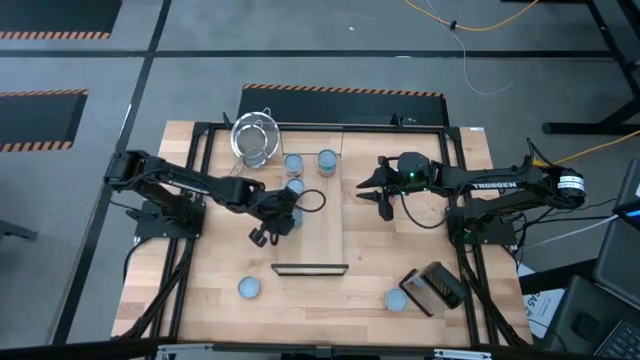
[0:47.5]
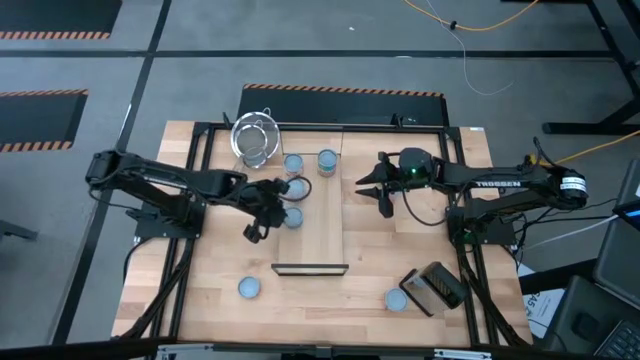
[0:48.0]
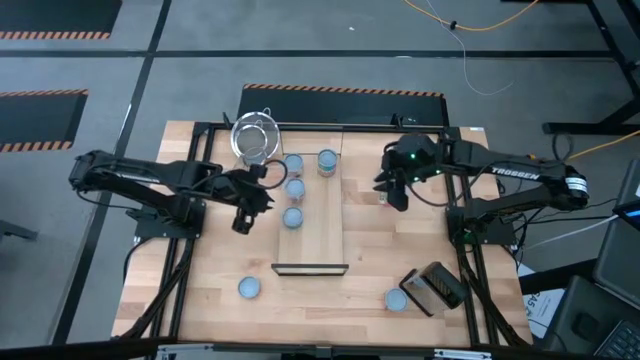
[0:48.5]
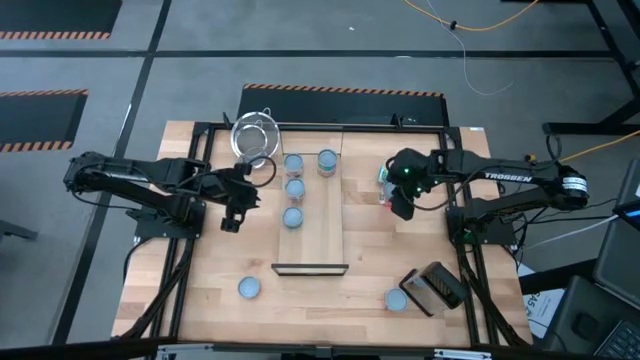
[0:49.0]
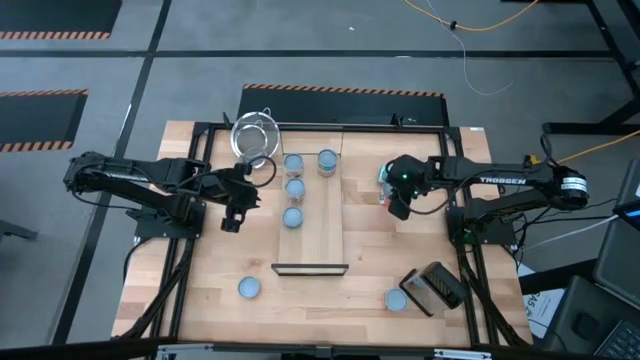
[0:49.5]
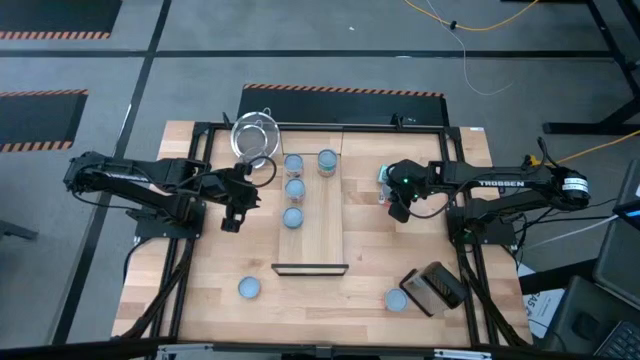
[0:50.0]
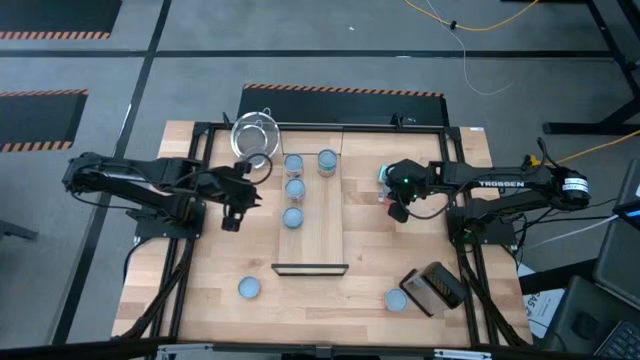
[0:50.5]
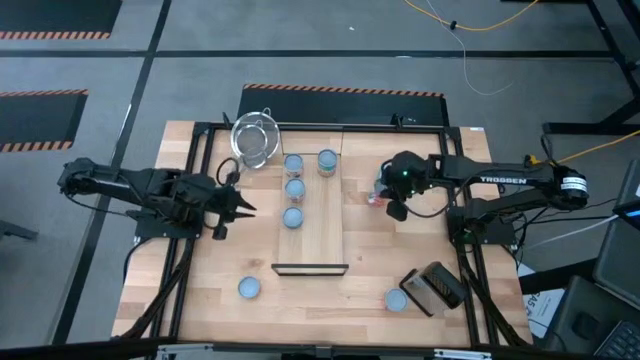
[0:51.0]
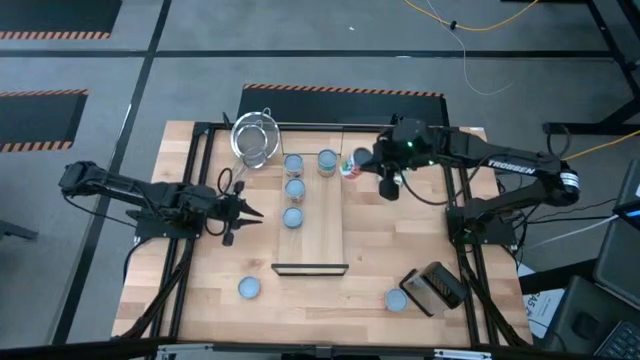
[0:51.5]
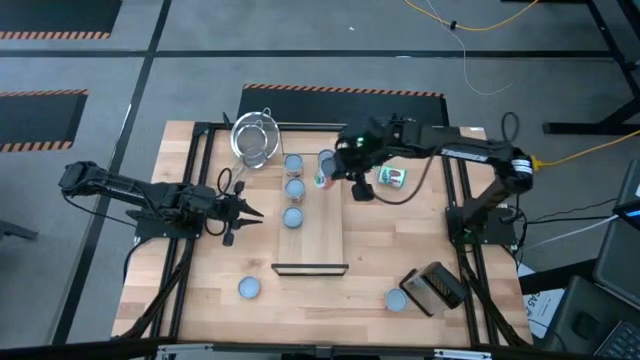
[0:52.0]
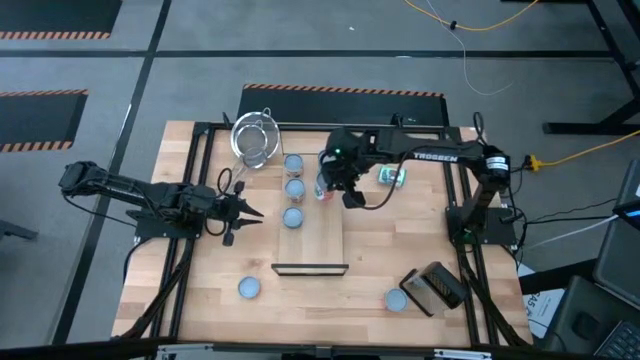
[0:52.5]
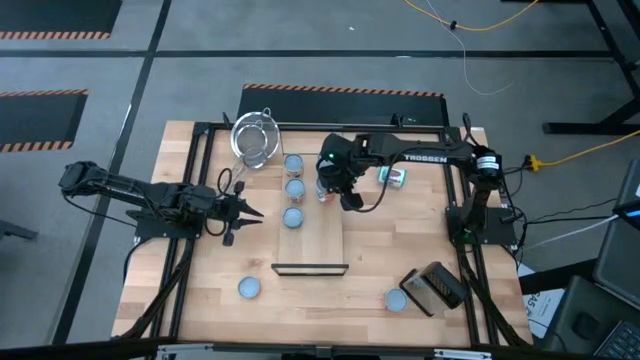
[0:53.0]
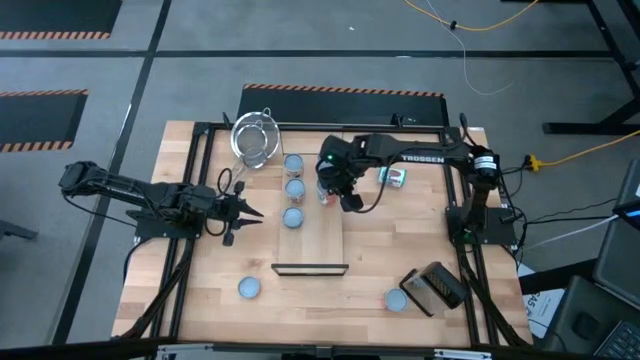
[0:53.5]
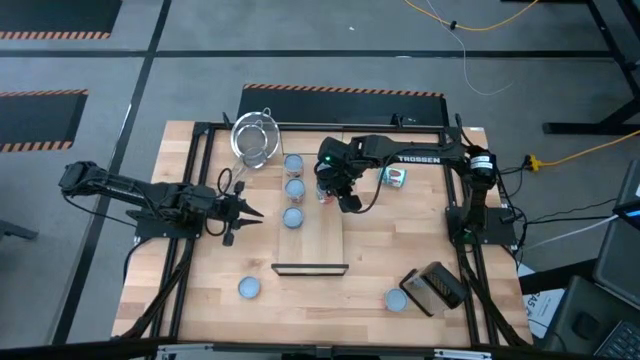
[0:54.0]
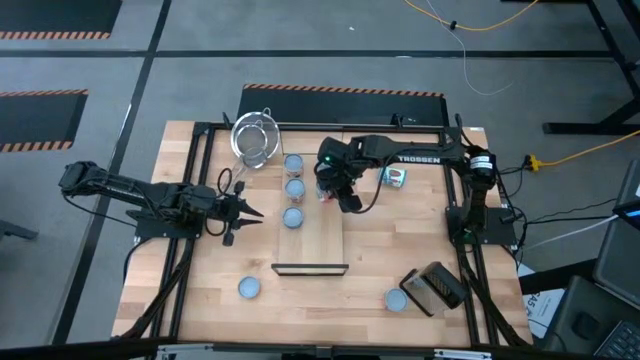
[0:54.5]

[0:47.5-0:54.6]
Task: Pick and place cans onto a shelf
Put the canned mixed fruit on the shelf

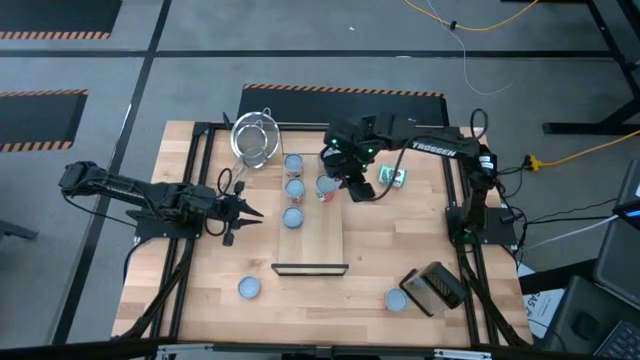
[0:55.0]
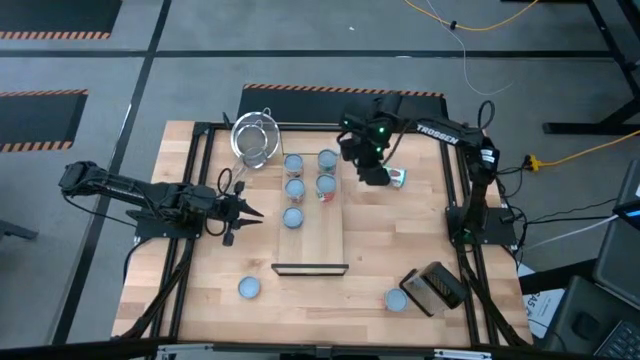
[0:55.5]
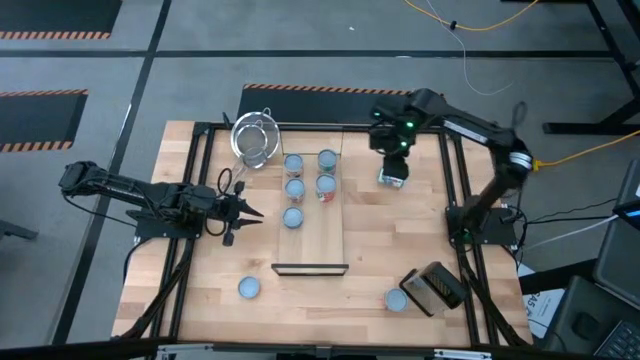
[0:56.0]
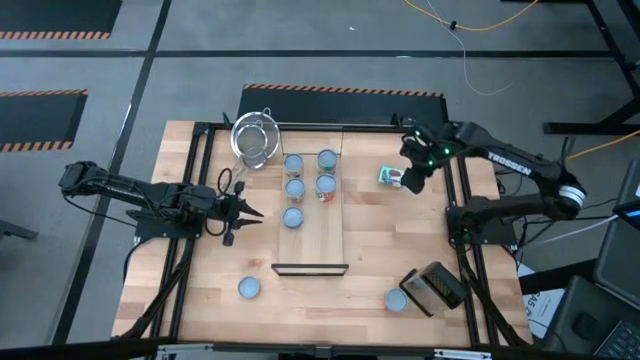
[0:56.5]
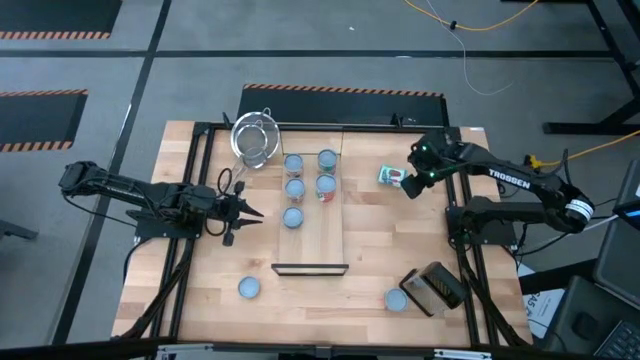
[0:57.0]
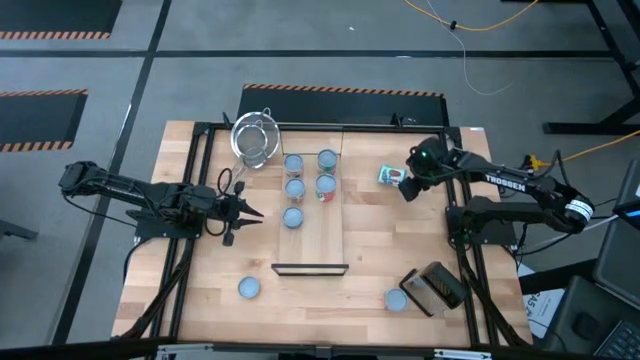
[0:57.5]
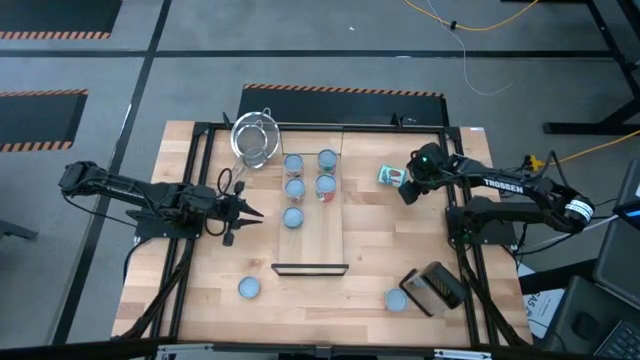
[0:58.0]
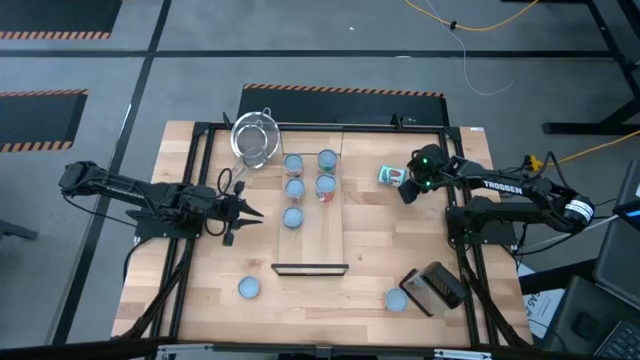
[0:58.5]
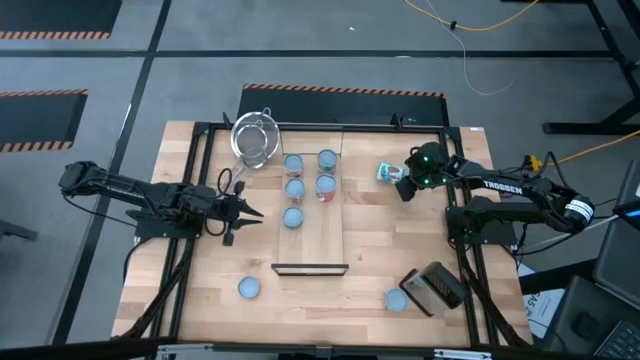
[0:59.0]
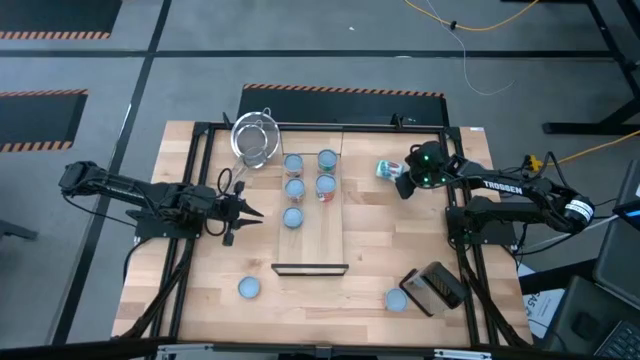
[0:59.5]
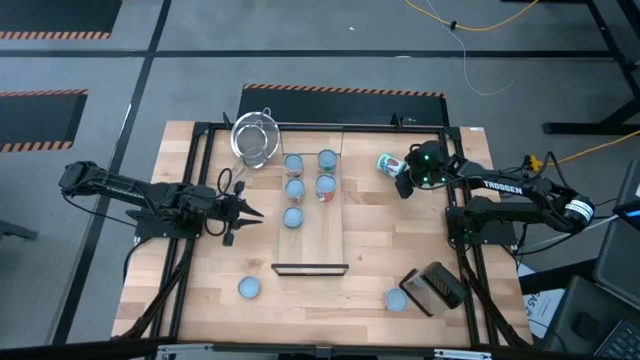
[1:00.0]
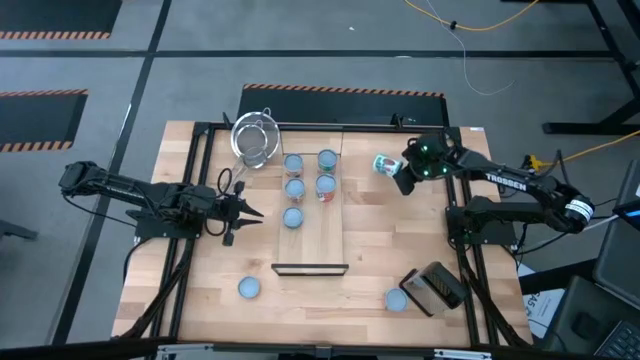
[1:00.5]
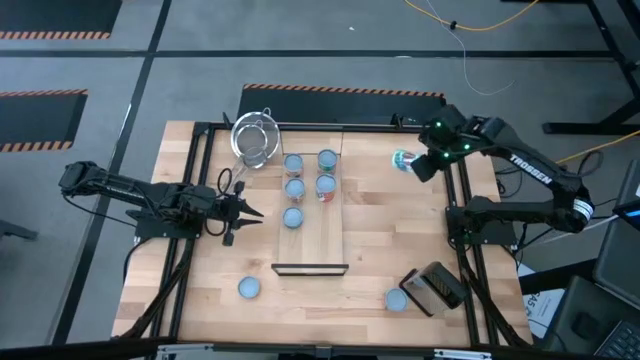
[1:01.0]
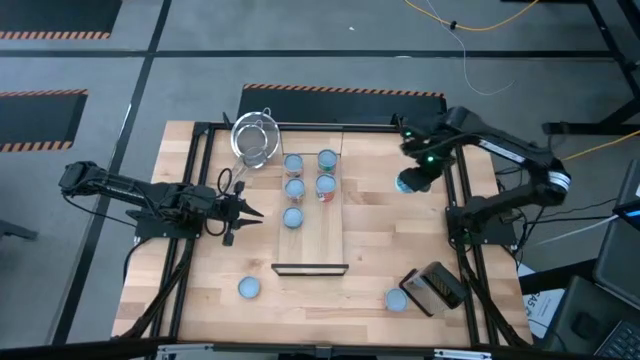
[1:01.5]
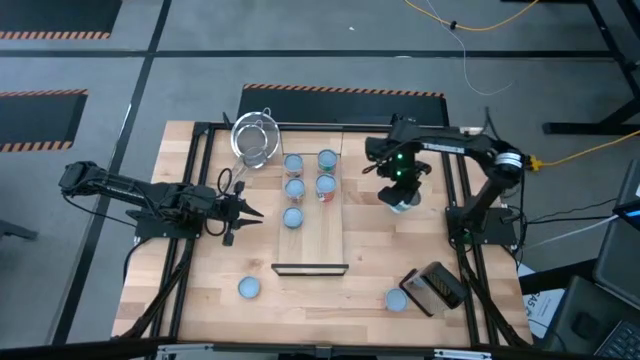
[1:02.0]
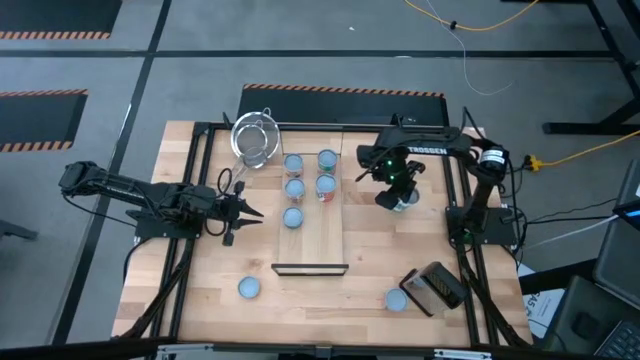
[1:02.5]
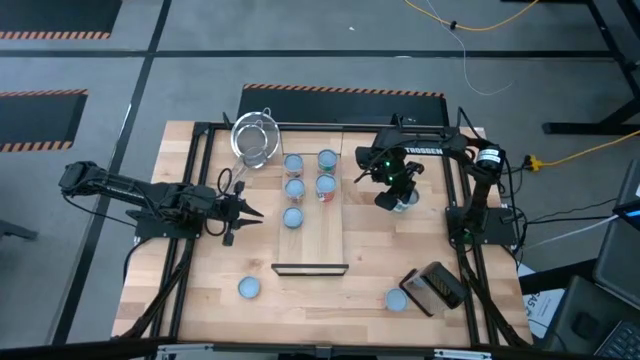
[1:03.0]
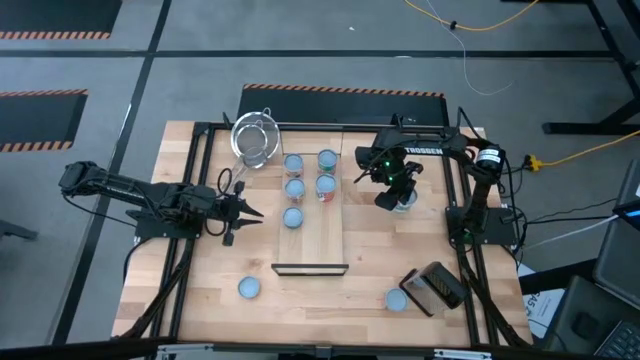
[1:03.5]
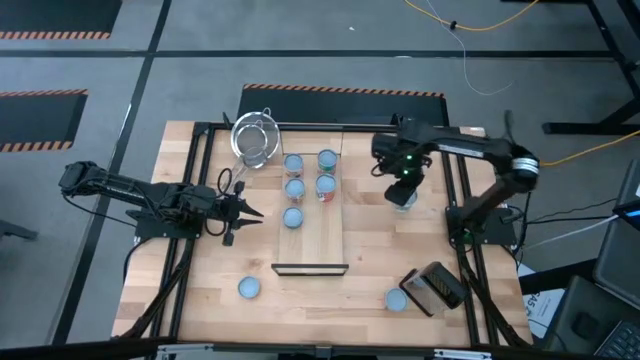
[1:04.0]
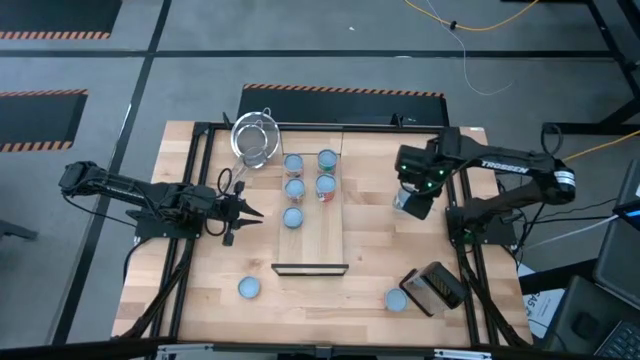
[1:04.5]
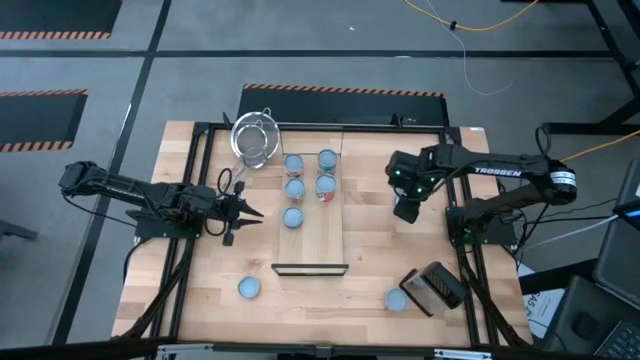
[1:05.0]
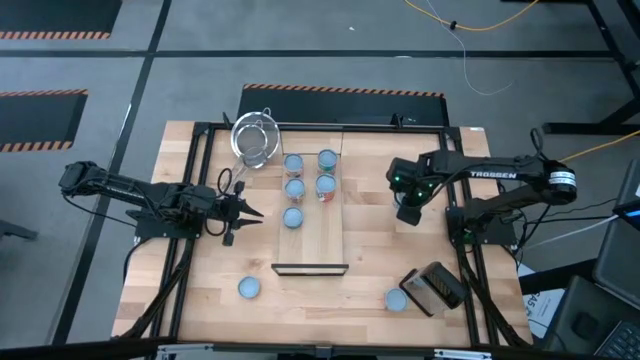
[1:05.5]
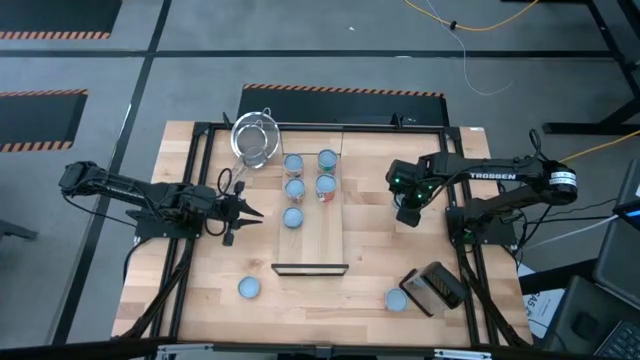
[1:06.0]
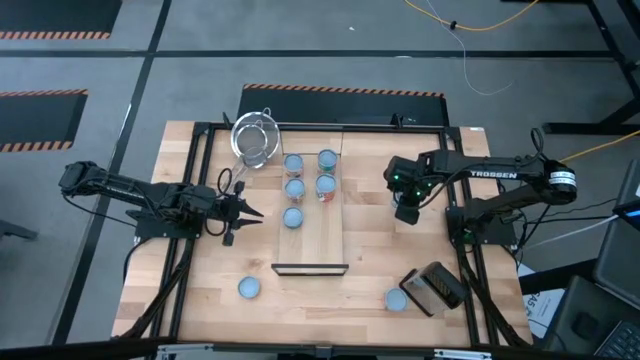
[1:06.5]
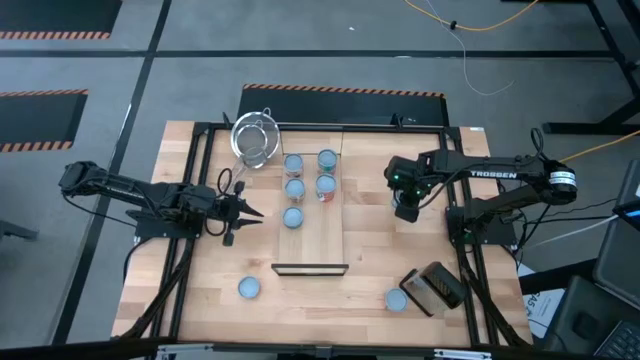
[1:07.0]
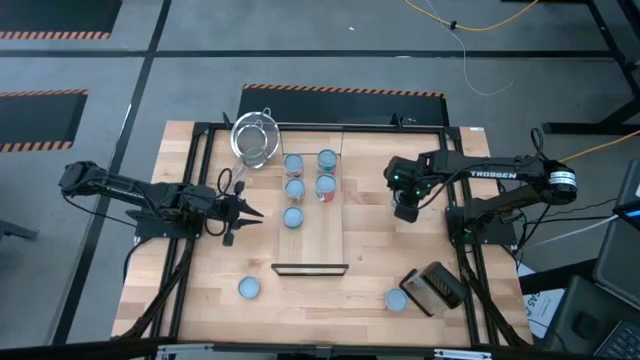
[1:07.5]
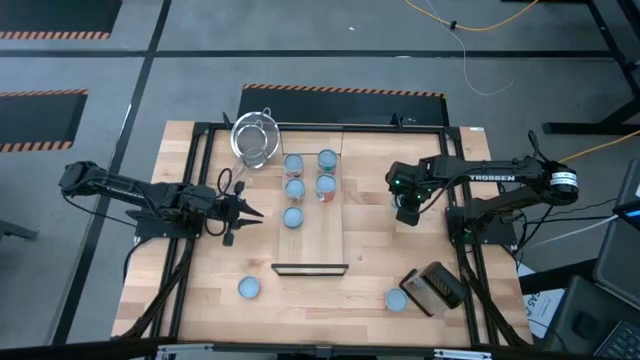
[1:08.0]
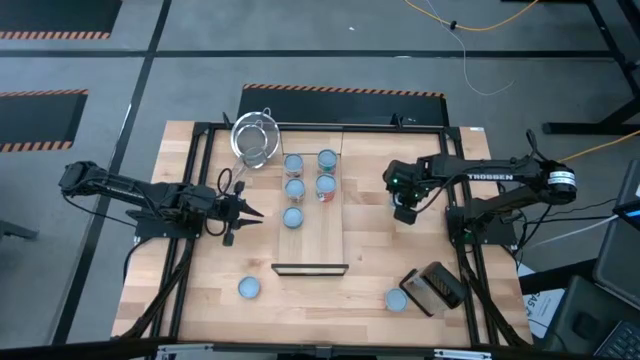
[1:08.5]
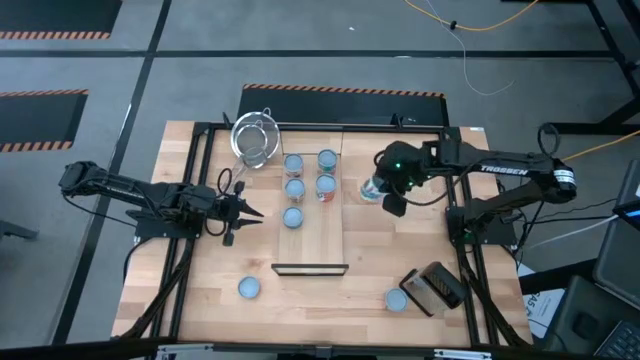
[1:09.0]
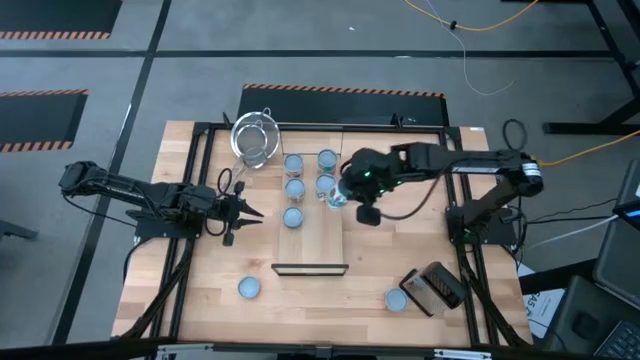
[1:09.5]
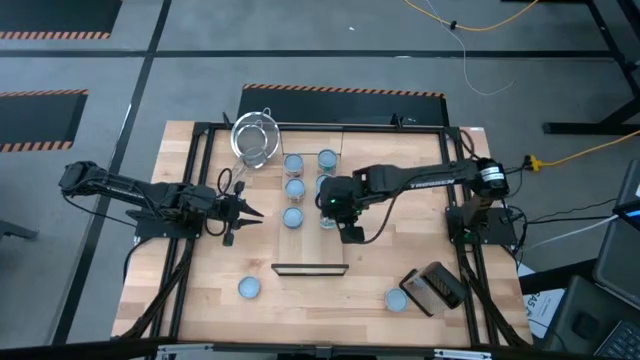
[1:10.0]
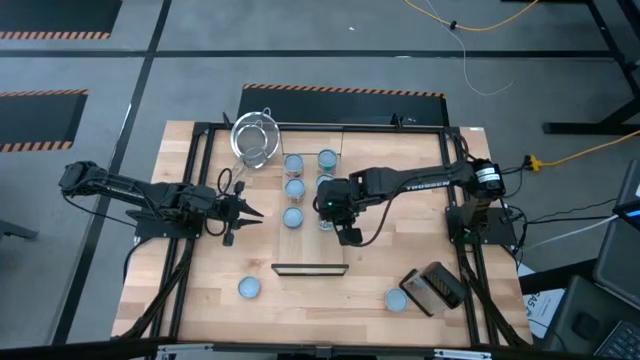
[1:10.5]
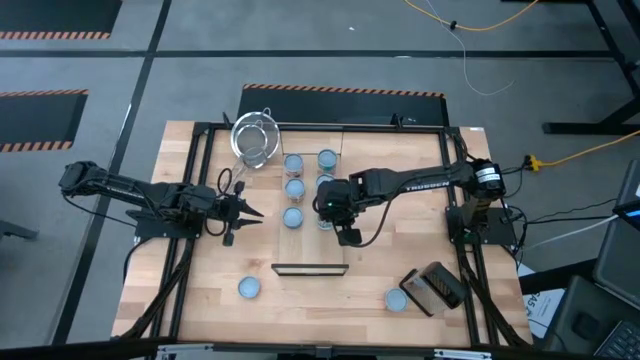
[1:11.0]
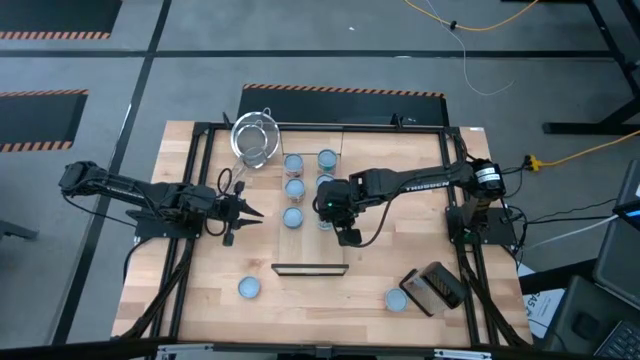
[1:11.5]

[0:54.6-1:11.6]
Put the canned mixed vegetables on the shelf
